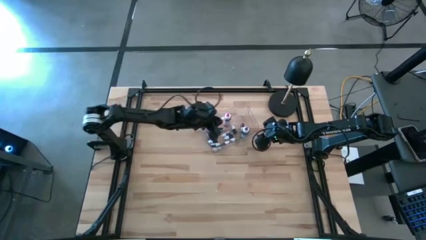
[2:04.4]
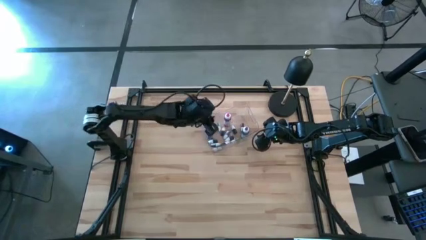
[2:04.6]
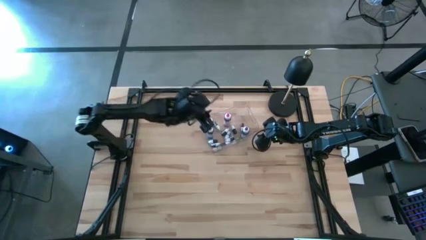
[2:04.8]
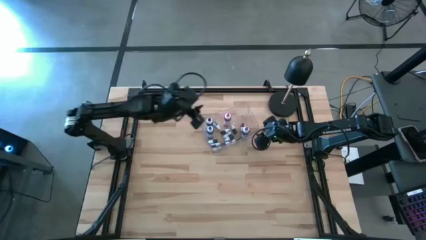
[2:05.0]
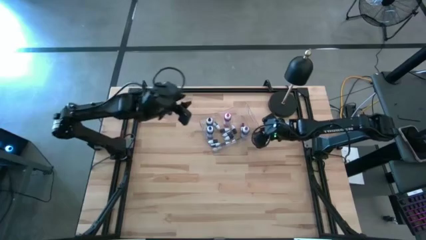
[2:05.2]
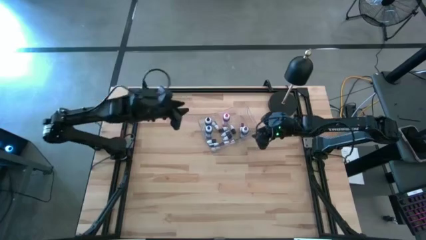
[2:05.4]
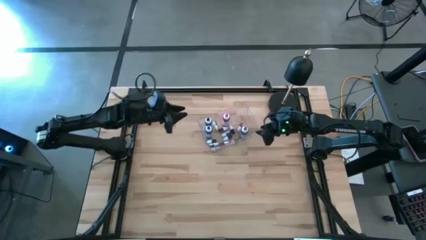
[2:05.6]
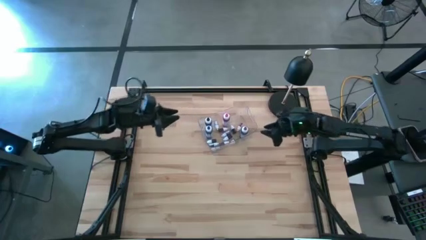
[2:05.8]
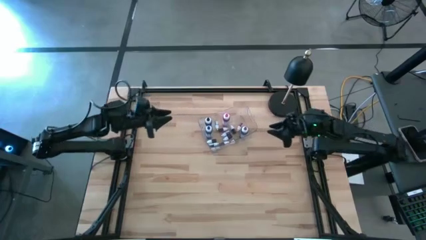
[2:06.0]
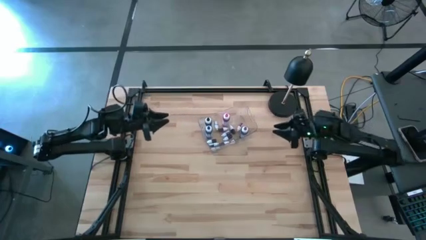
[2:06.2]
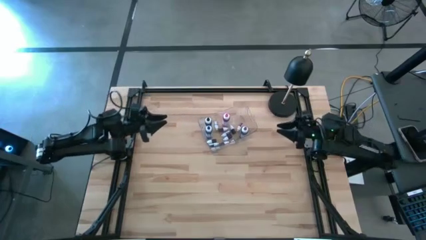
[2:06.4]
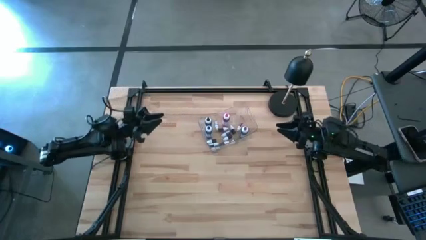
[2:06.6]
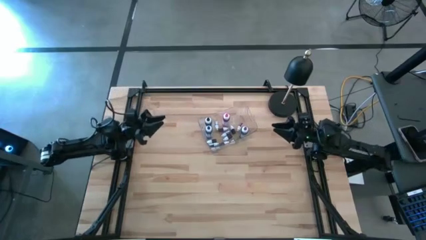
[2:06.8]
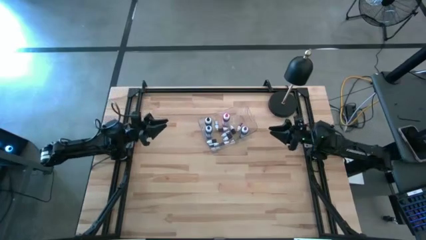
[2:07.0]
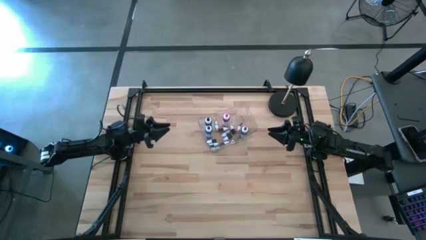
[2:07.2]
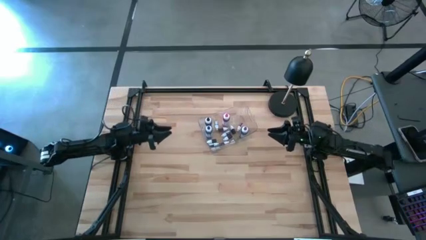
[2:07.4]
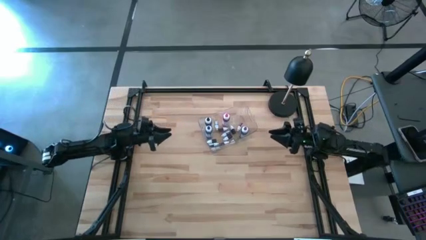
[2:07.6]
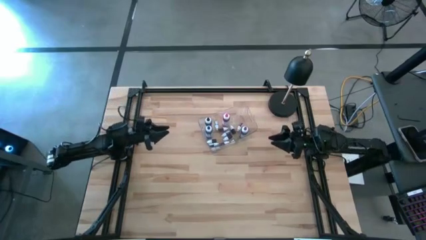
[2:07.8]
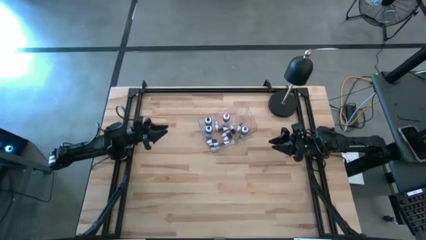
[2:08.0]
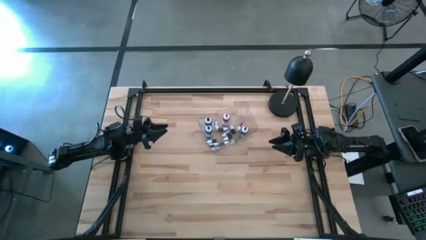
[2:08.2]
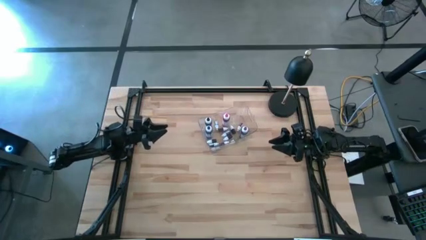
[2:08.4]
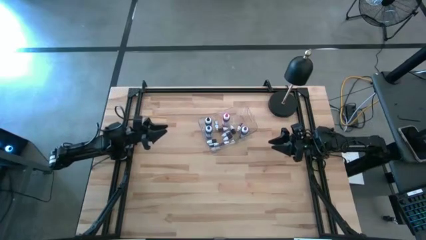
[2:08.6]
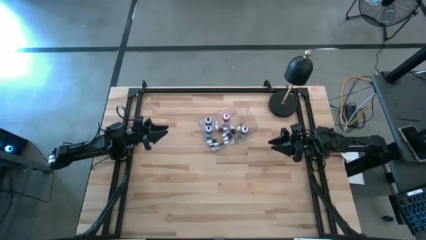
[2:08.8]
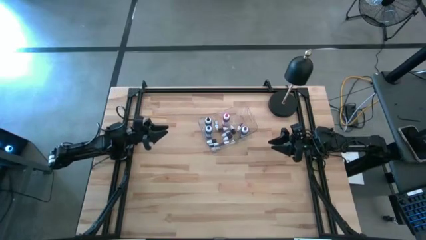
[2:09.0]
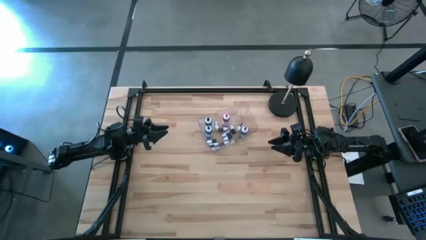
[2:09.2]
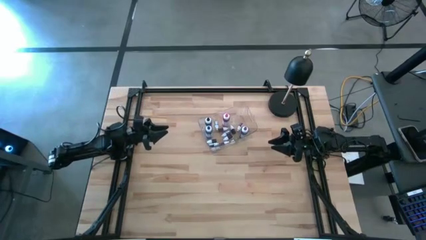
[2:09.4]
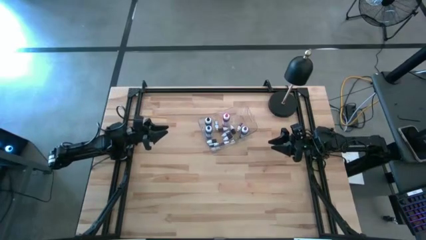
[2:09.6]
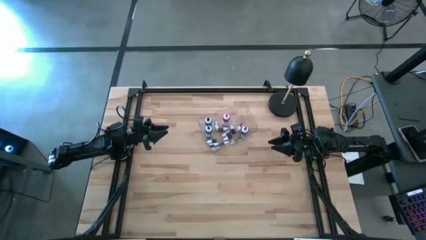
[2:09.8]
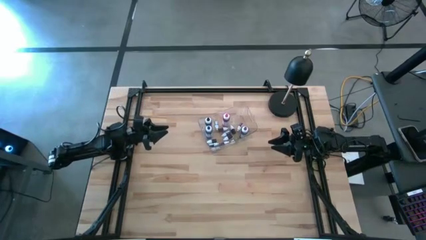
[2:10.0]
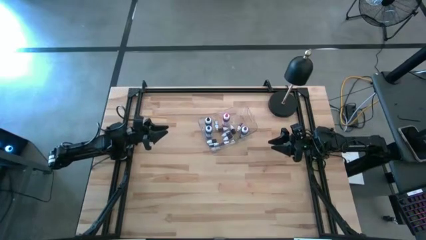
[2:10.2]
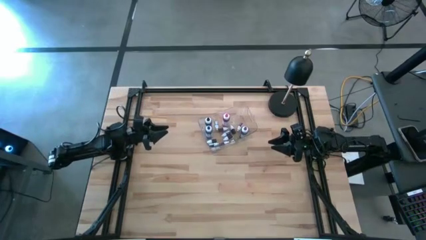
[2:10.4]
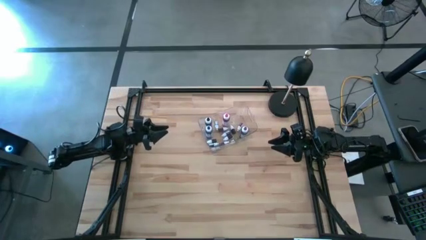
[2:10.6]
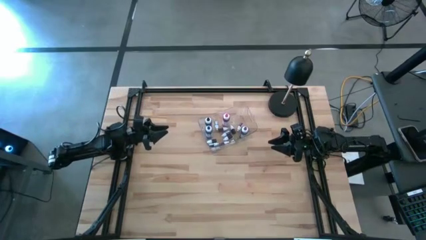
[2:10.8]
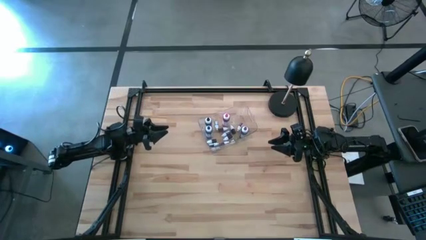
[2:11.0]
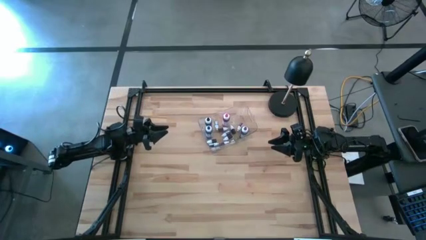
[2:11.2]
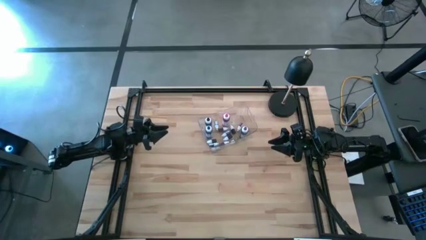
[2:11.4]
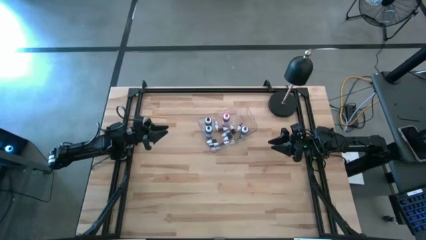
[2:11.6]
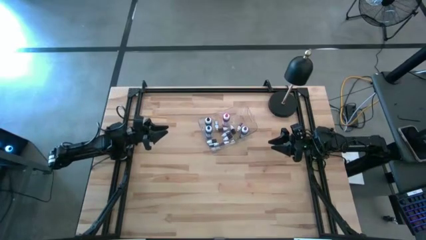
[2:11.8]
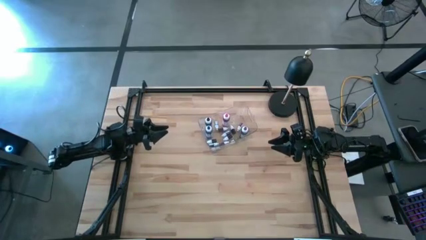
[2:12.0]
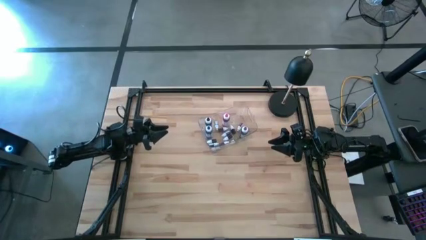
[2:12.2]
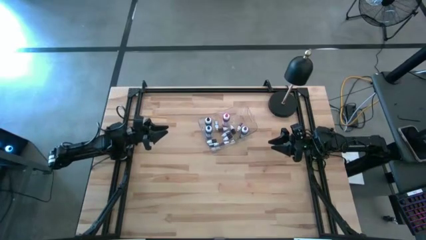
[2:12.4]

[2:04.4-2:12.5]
Task: Pick & Place food coloring
Return to Home Position

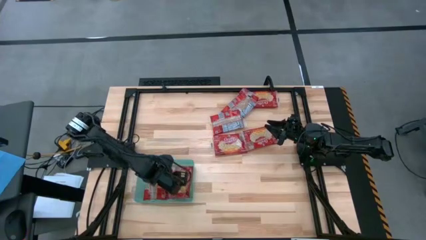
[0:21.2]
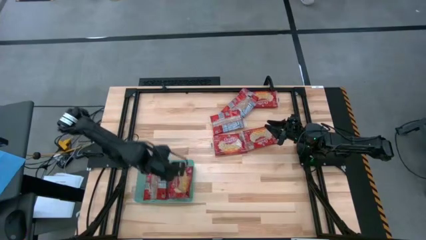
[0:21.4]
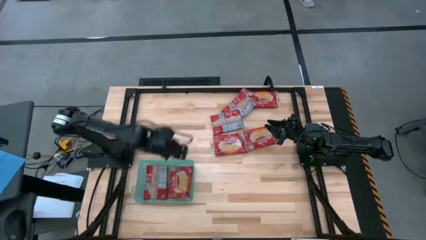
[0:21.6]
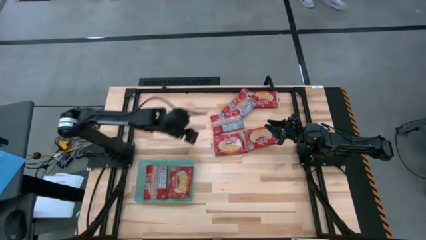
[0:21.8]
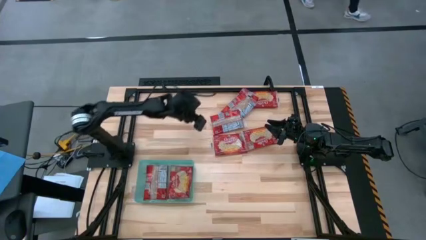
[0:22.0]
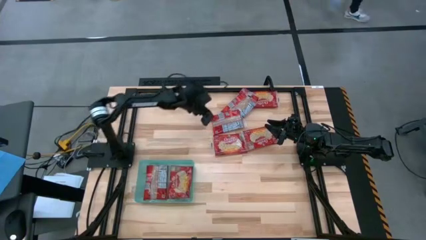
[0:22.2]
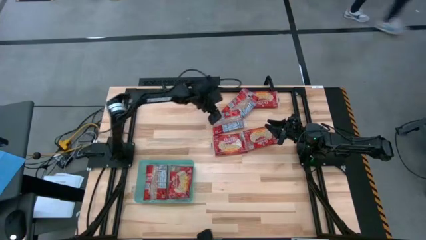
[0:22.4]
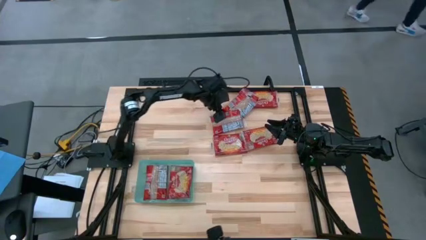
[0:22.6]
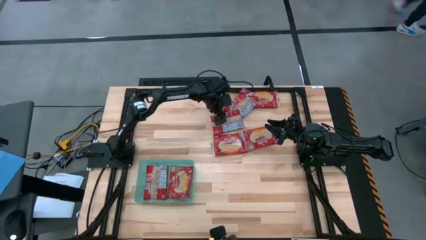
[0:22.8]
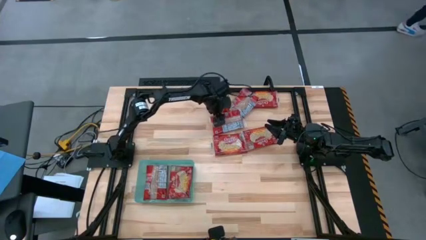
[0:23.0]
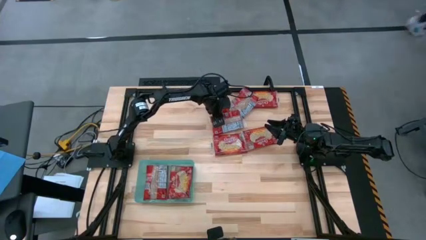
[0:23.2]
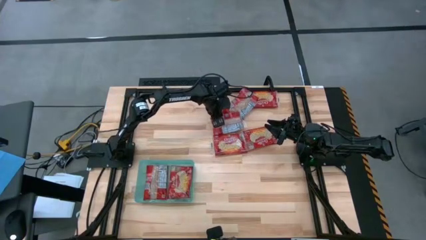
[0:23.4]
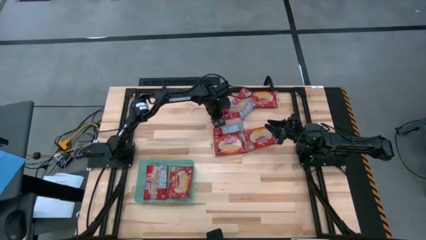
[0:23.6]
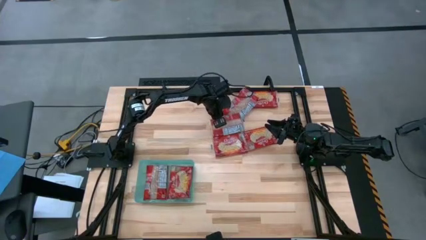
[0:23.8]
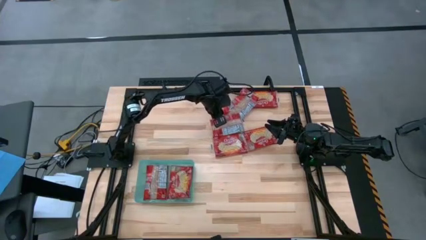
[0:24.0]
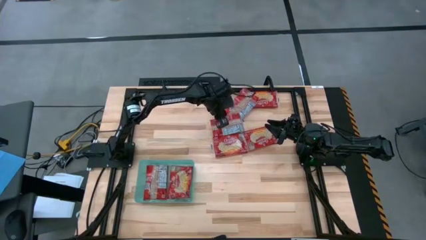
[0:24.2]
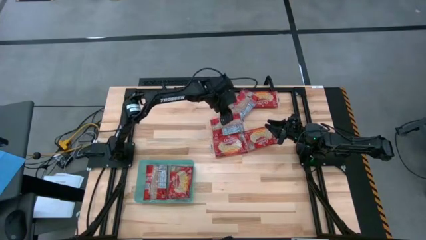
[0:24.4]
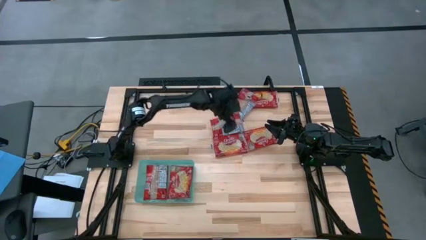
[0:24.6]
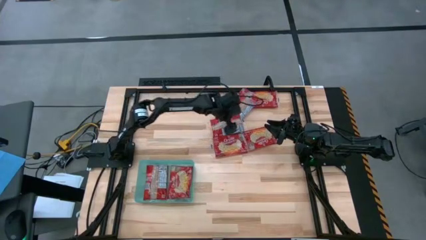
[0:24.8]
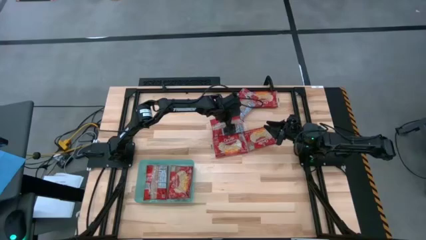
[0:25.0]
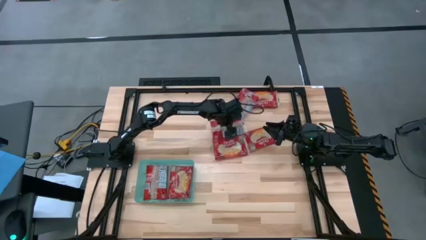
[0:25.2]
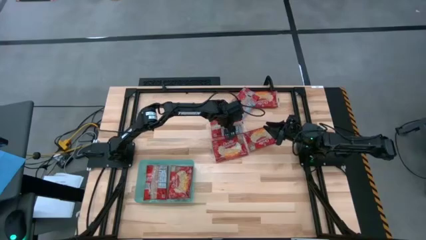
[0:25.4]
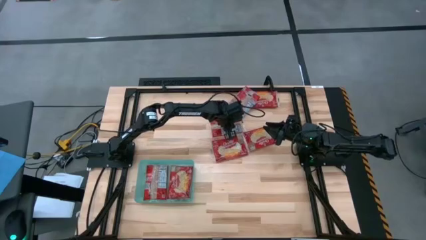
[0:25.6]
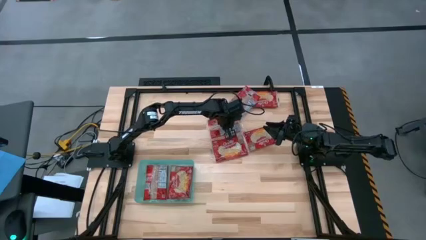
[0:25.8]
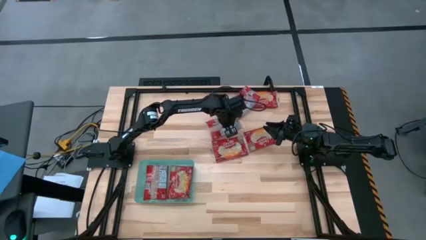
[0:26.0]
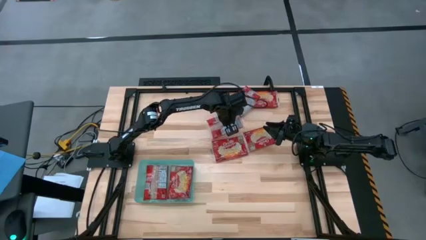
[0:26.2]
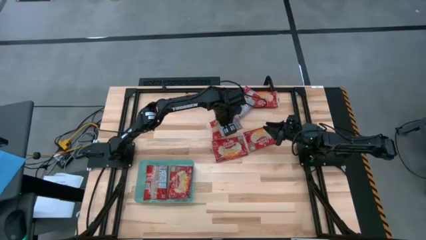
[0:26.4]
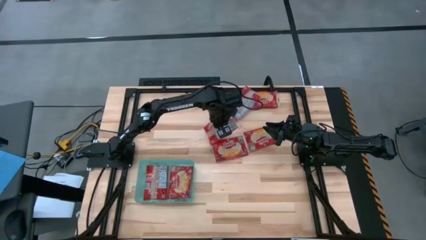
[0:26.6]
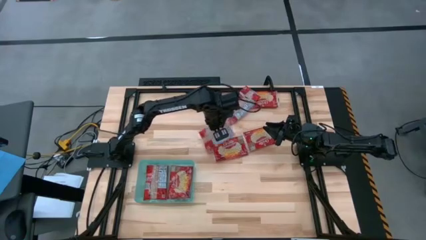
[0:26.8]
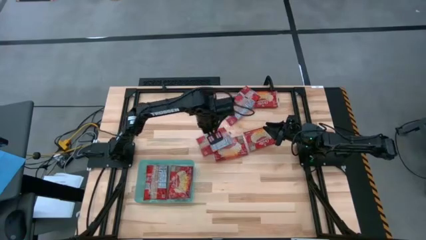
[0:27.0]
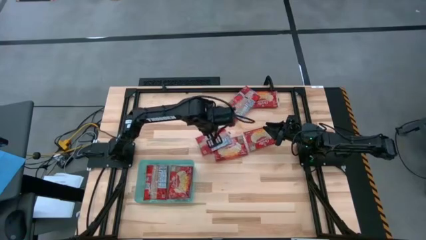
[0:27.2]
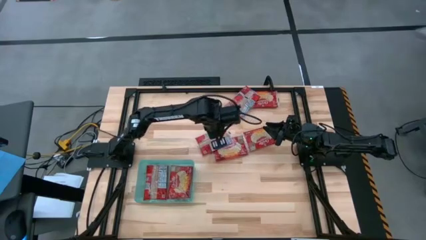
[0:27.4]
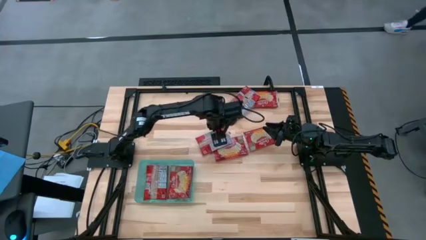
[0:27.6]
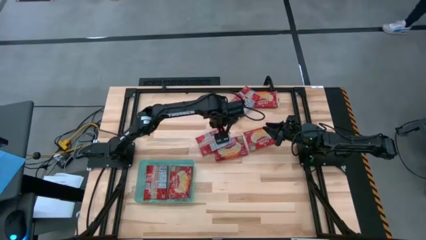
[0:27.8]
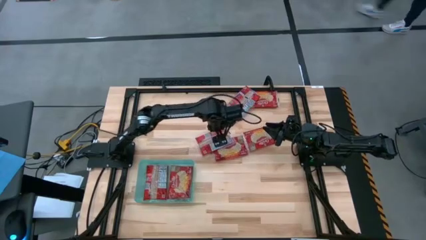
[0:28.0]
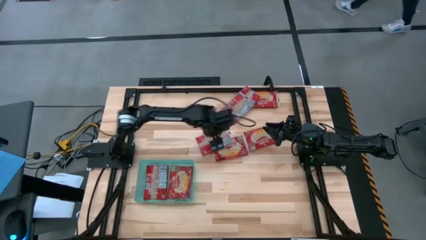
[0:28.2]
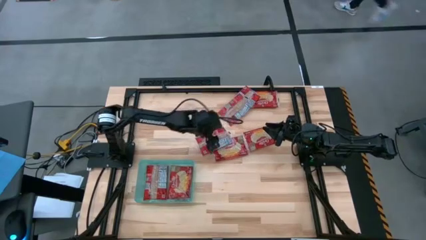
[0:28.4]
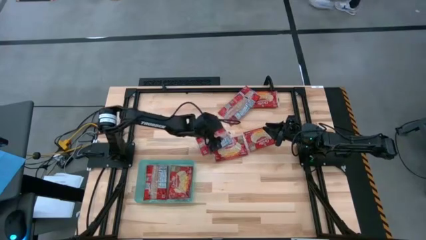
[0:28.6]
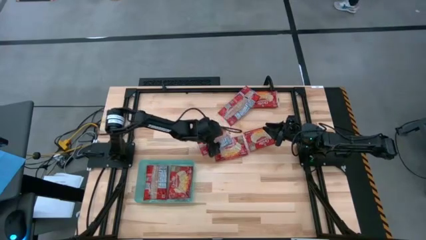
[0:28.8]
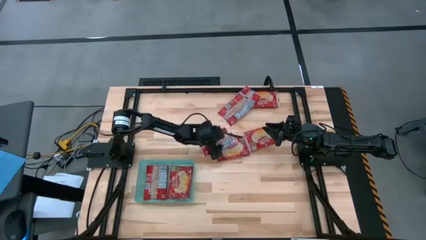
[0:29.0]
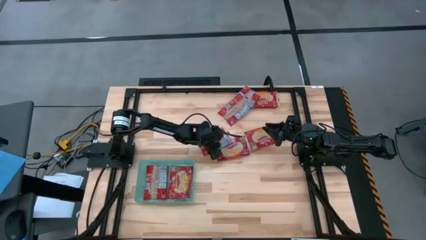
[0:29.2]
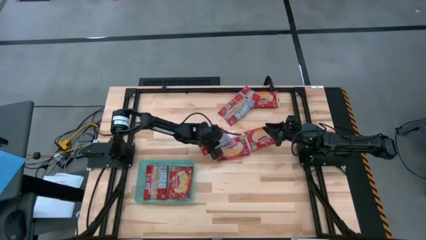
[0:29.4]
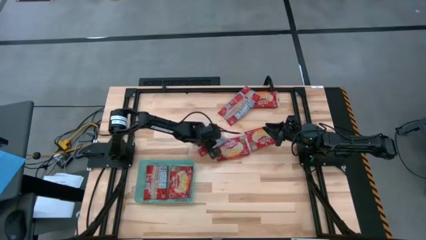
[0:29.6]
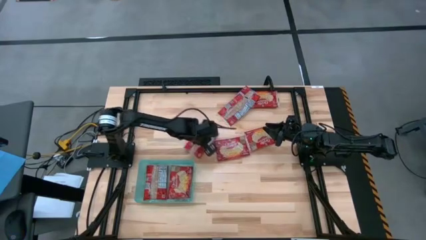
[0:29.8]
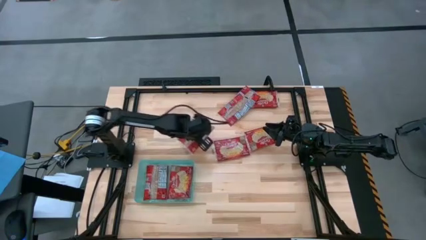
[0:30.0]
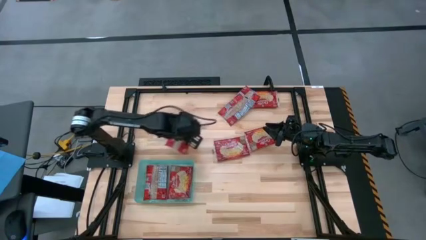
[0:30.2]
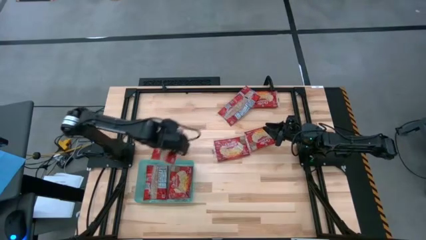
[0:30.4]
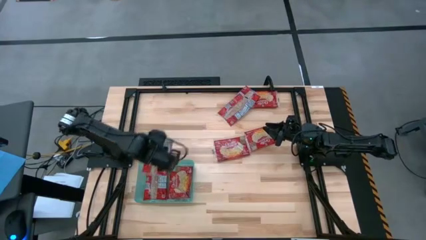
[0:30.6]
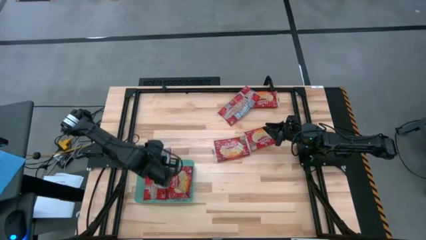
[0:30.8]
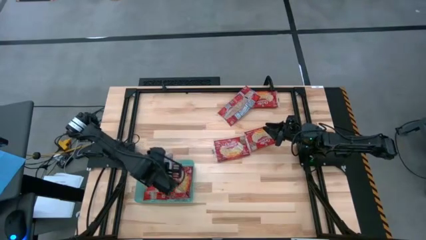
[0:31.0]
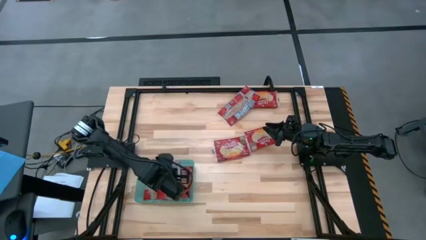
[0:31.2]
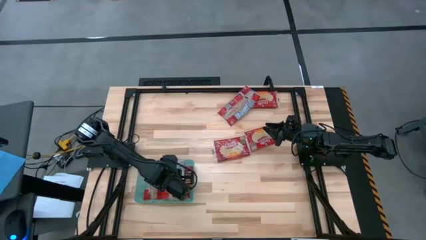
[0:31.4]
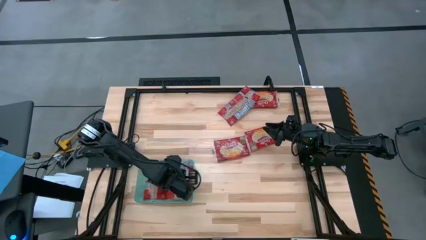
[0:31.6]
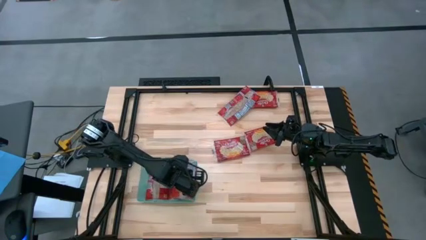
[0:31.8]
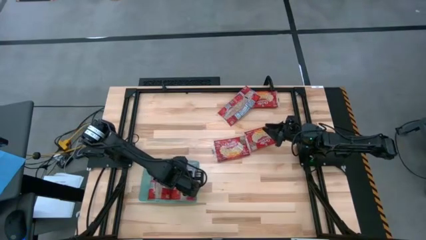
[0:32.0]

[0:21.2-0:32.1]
Task: Sort popcorn bags into baskets
Put the red popcorn pack into the green bin
